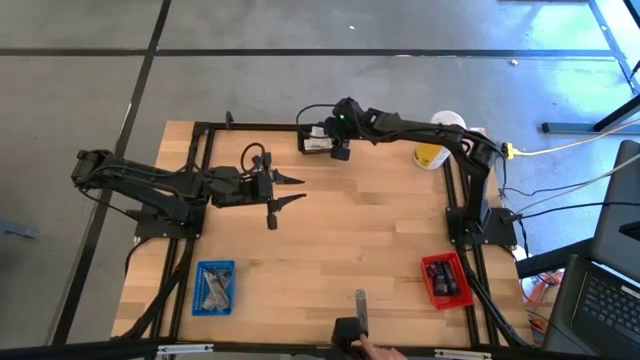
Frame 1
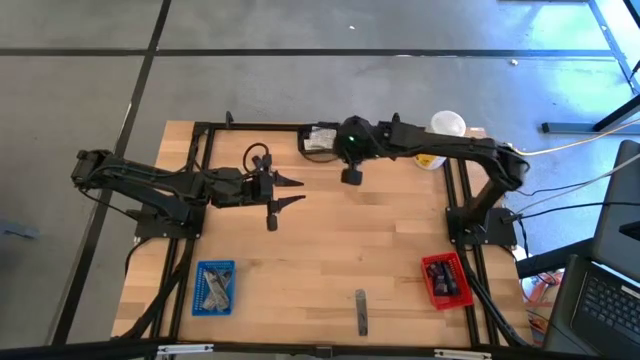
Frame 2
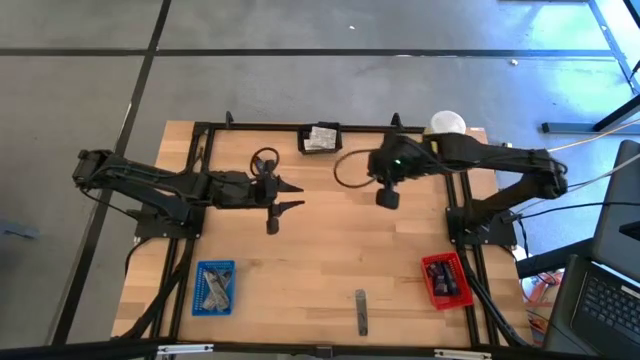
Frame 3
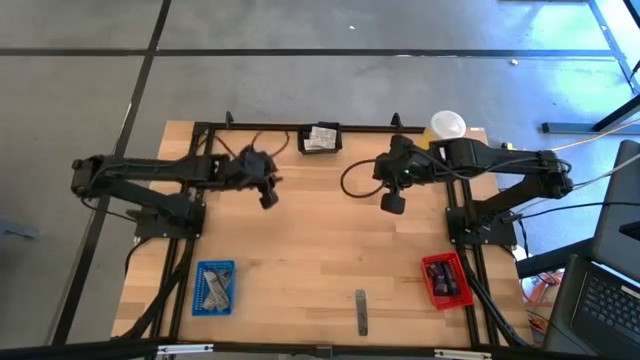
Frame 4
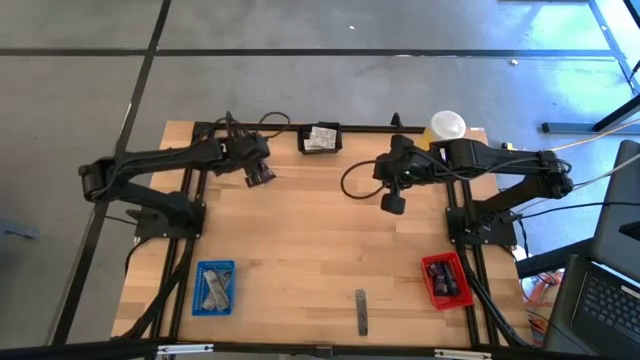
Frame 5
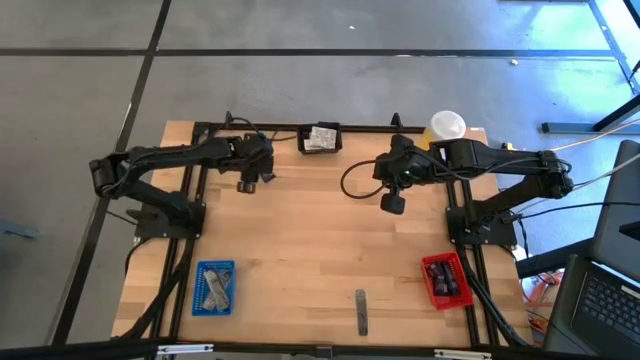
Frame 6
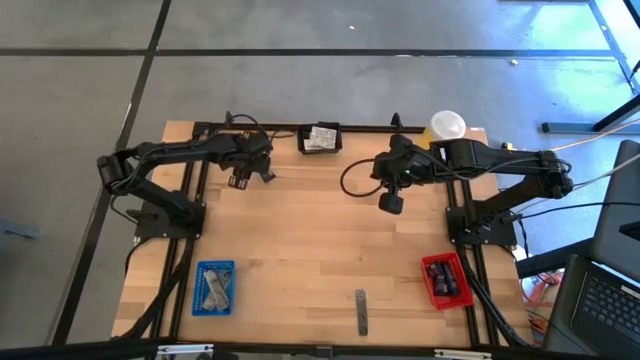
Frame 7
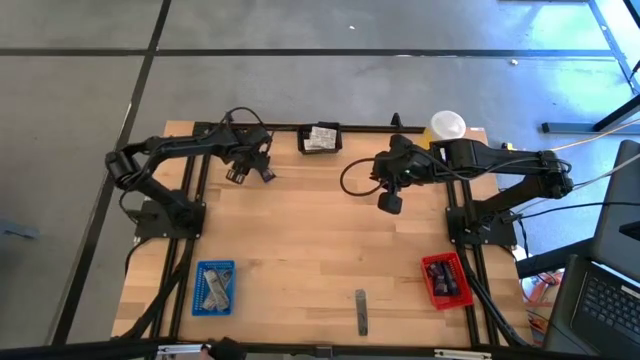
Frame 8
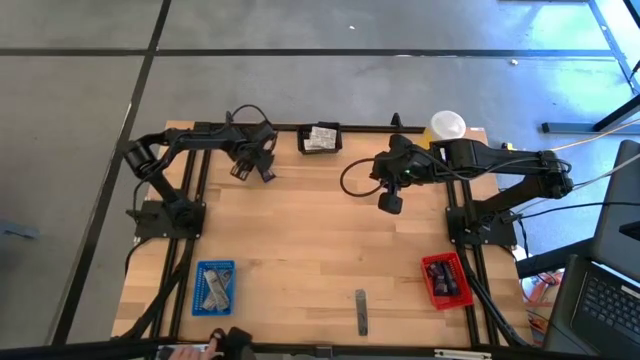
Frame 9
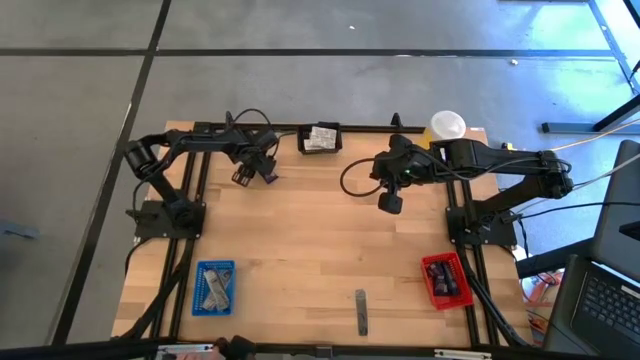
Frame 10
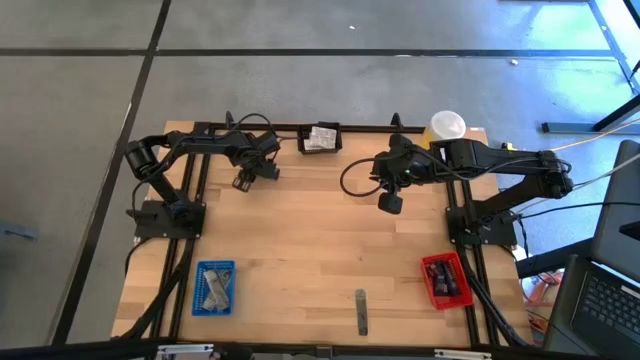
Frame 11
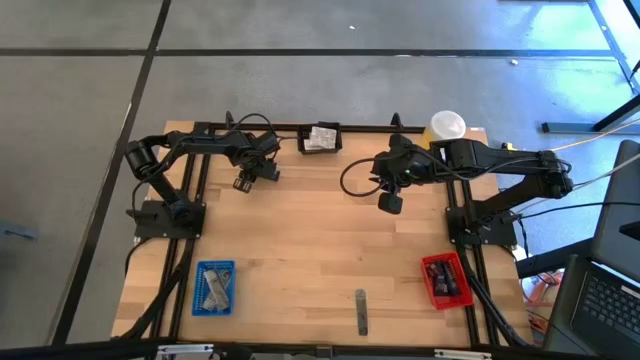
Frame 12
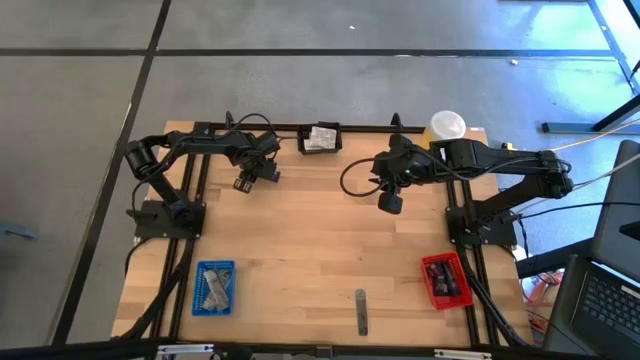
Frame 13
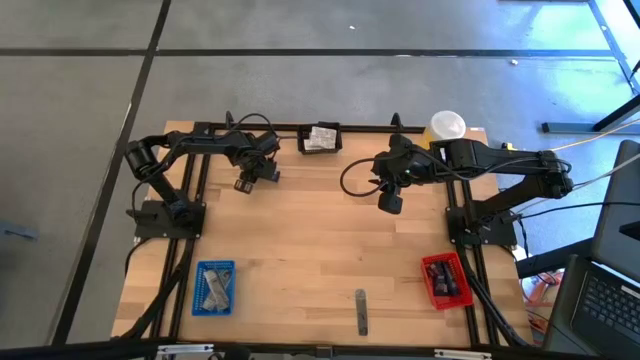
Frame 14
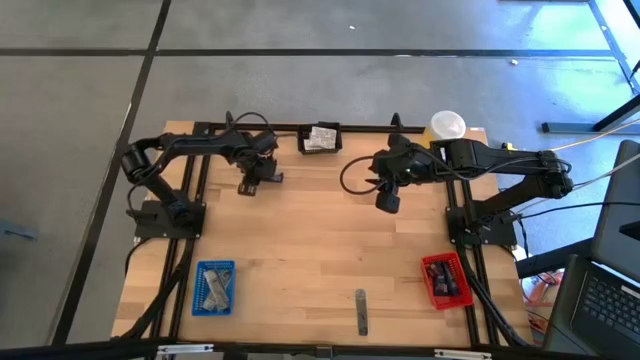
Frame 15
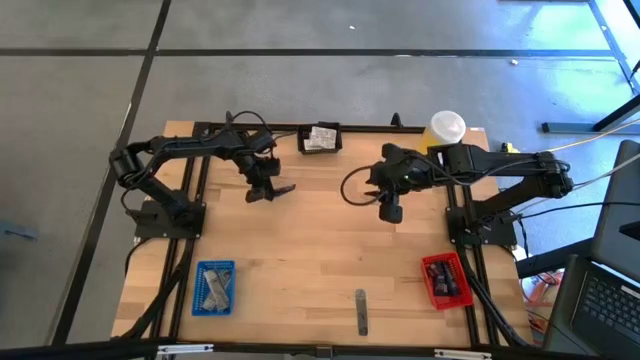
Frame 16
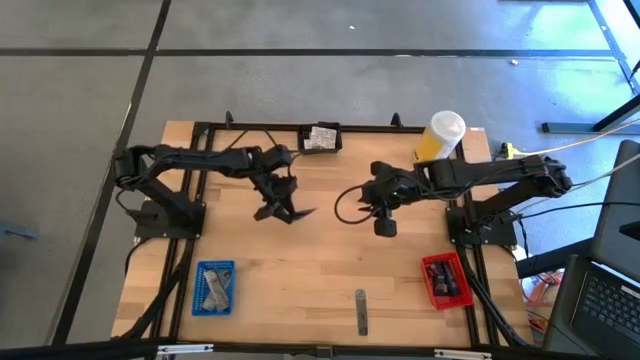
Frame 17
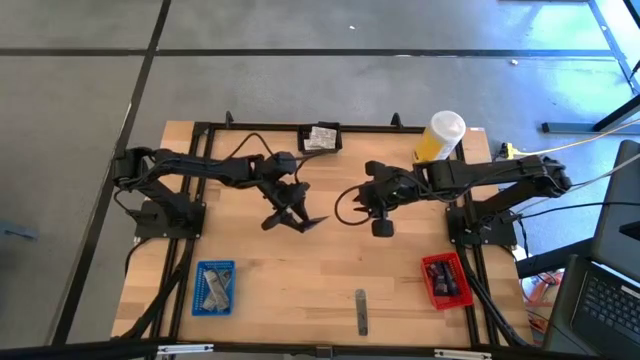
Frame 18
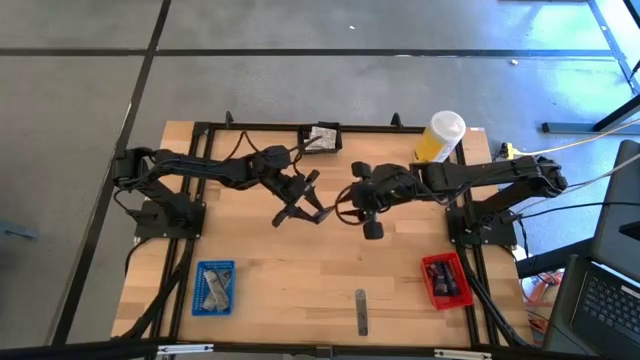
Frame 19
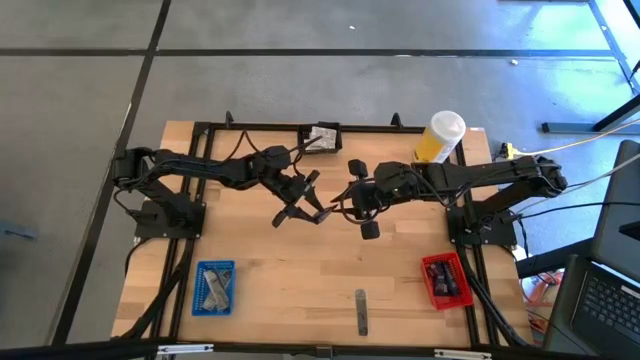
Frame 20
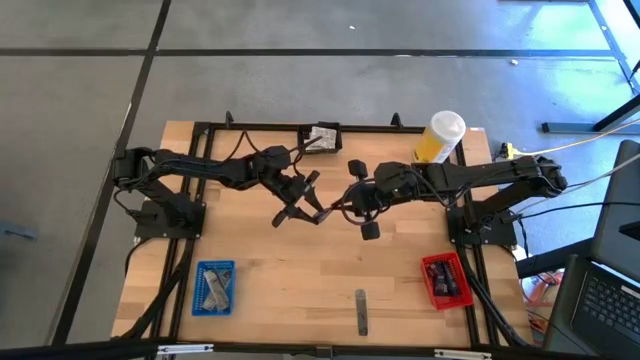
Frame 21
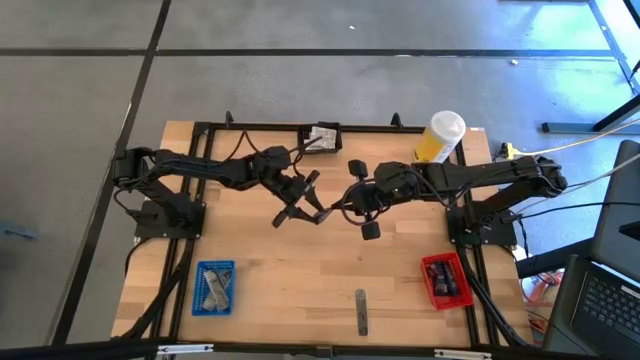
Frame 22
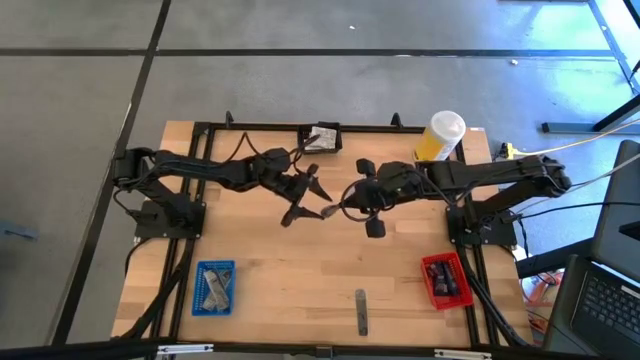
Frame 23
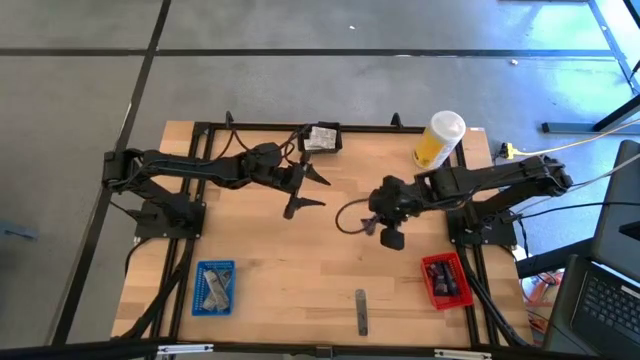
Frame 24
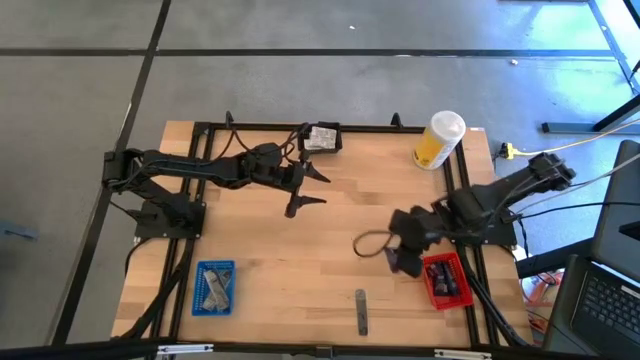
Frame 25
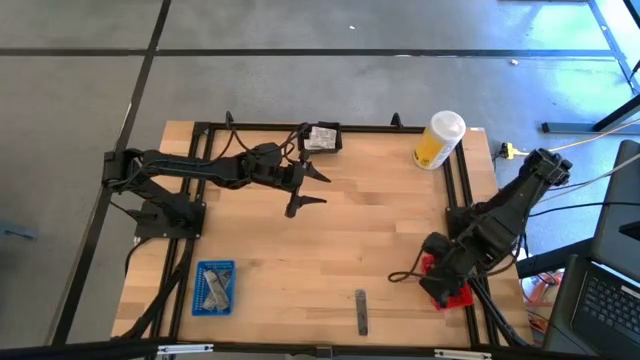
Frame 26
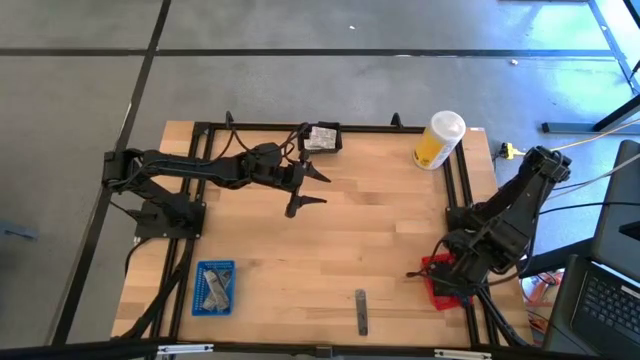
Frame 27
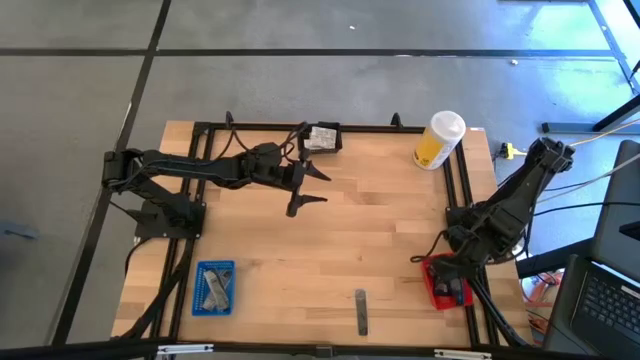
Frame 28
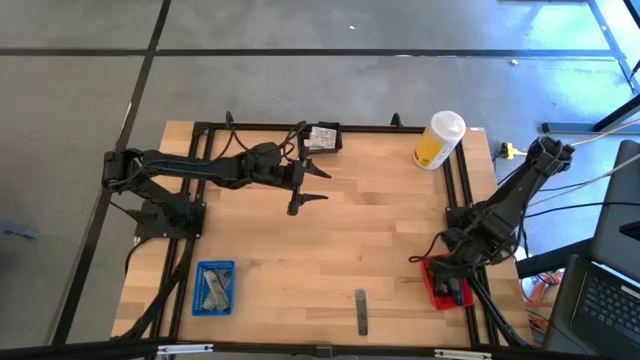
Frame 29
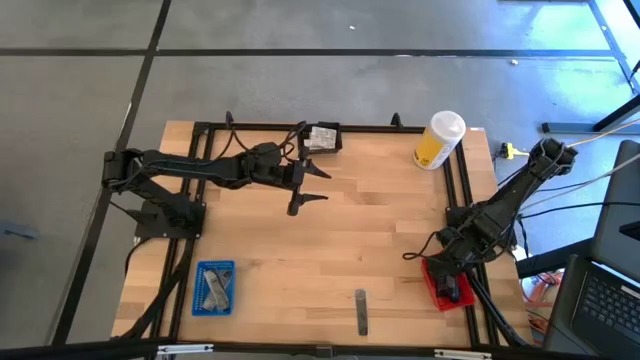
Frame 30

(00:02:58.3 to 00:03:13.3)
Task: Pick & Place Travel size toiletries
Put the blue shave butter into the red bin

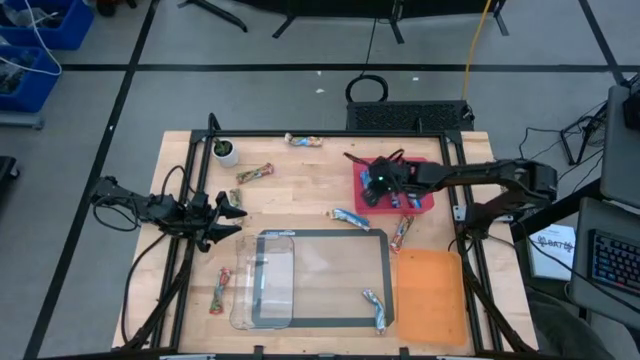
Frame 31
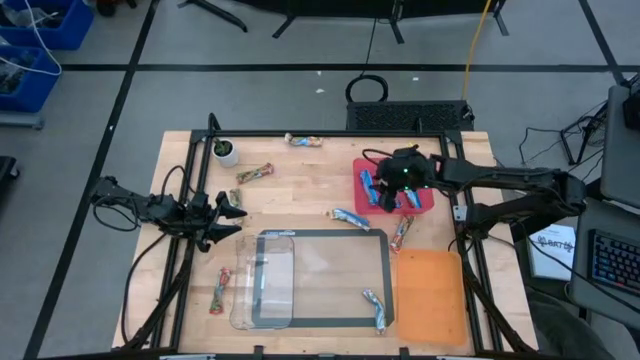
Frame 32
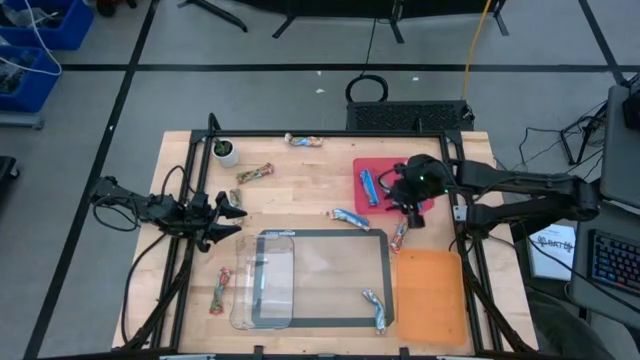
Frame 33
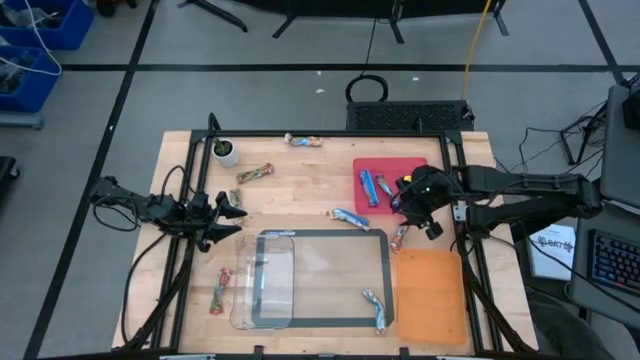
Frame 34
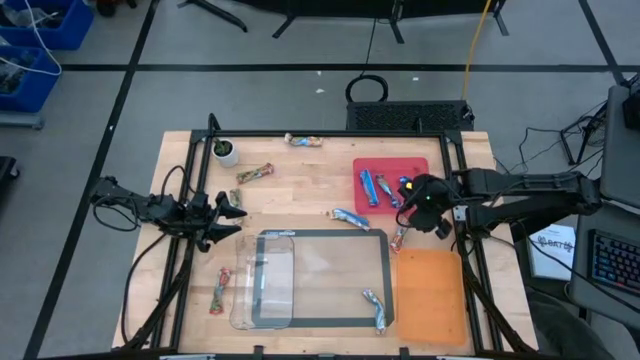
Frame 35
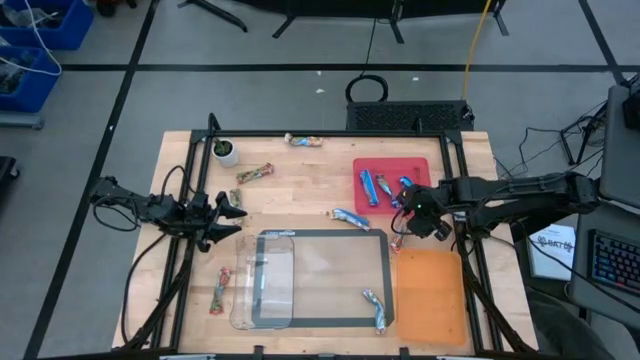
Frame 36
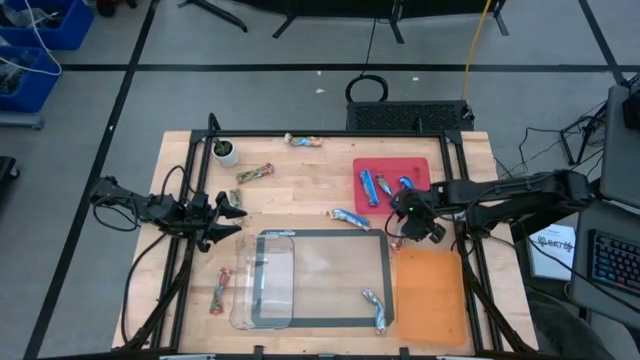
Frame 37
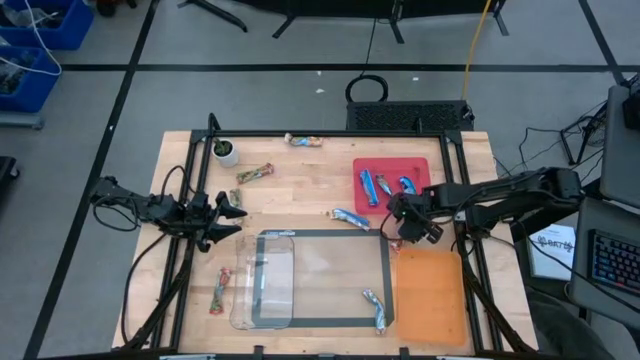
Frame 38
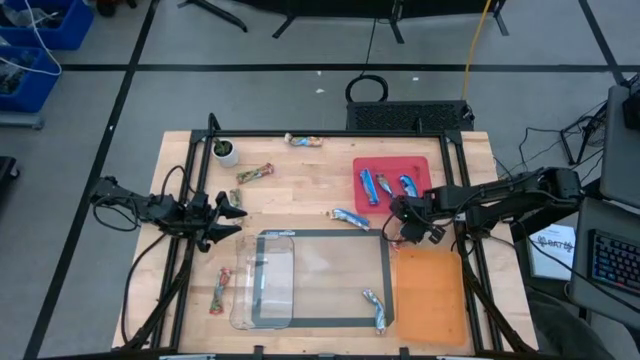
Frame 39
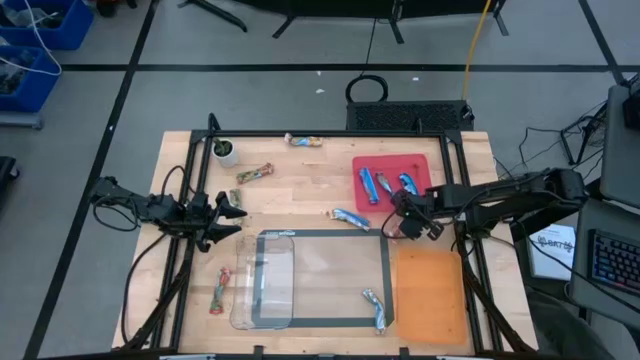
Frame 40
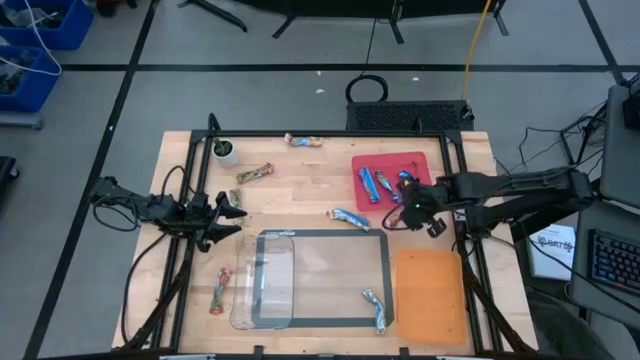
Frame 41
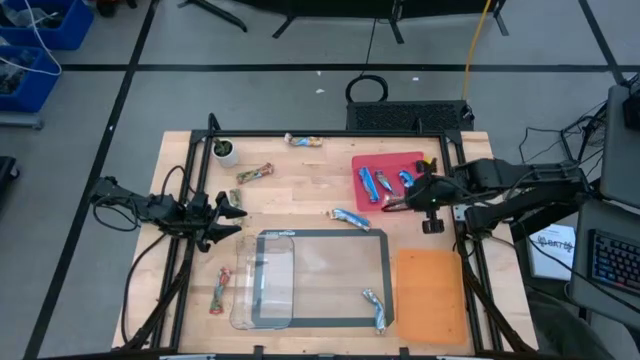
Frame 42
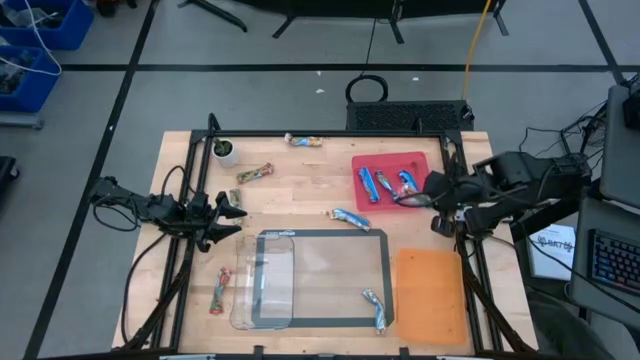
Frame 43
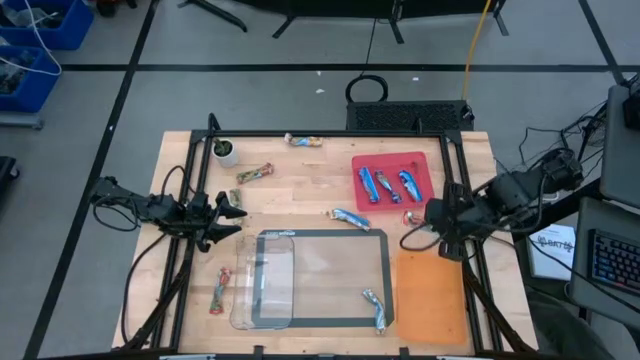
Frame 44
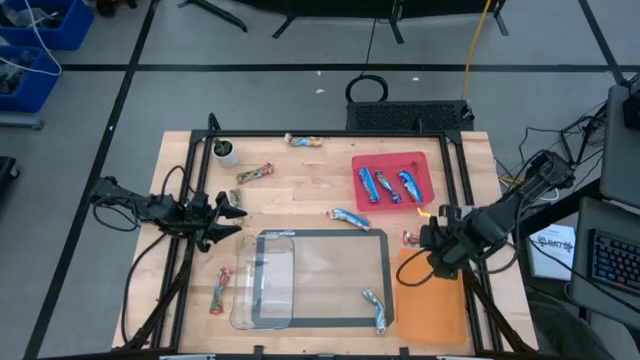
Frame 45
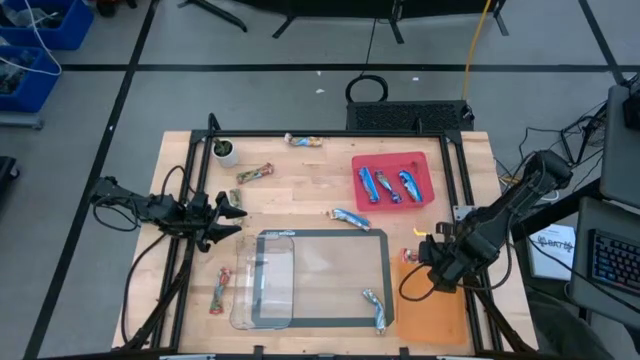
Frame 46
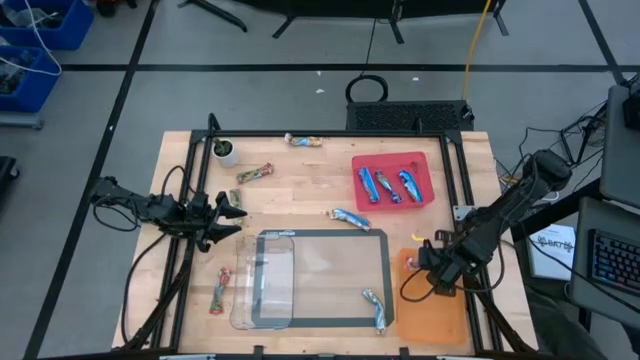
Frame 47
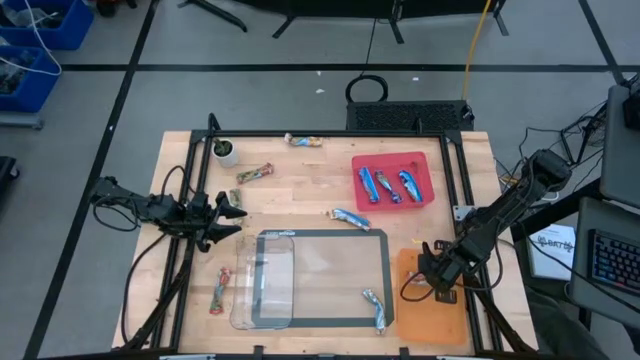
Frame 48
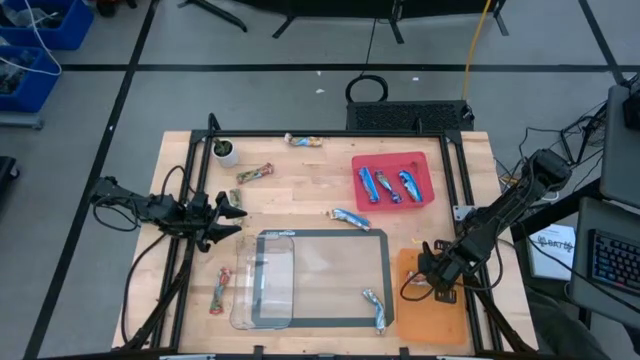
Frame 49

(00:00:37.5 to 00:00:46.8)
Task: Pick and place Granola Bars by type
Put the right red granola bar into the orange bin
